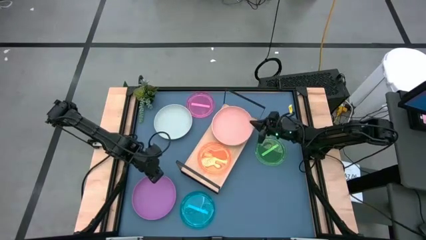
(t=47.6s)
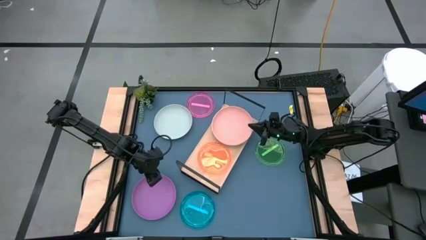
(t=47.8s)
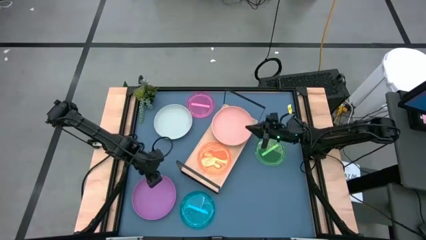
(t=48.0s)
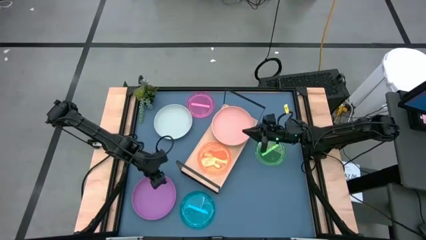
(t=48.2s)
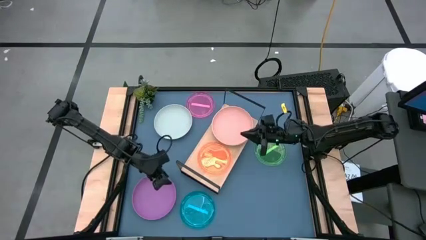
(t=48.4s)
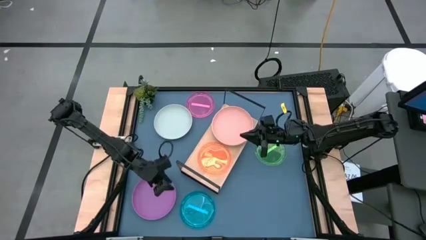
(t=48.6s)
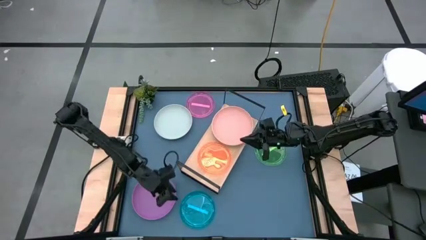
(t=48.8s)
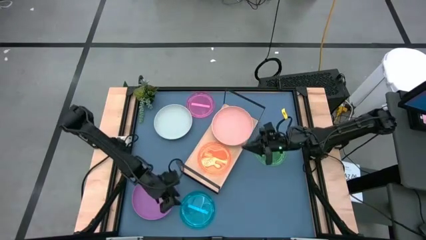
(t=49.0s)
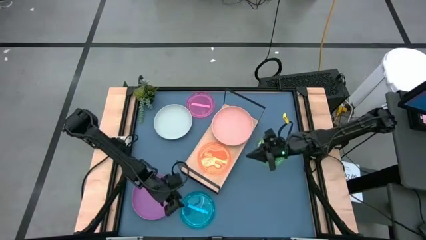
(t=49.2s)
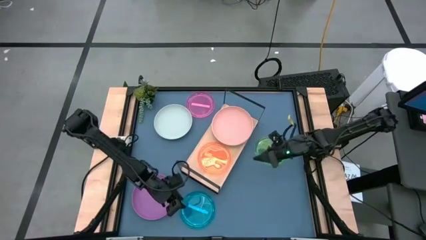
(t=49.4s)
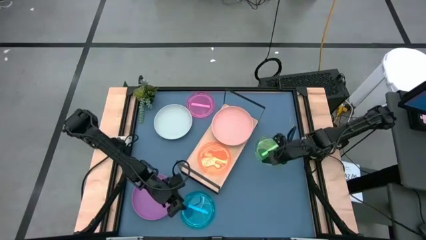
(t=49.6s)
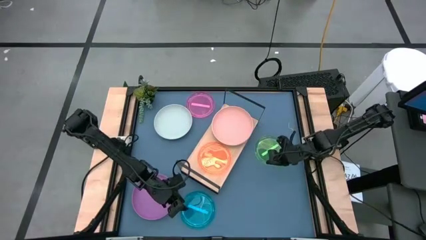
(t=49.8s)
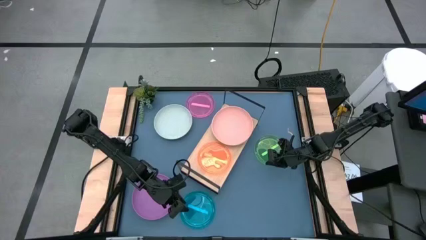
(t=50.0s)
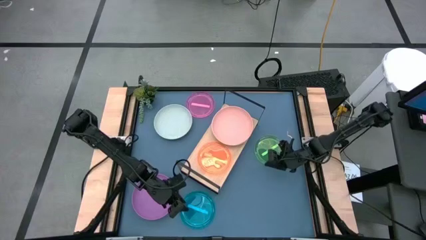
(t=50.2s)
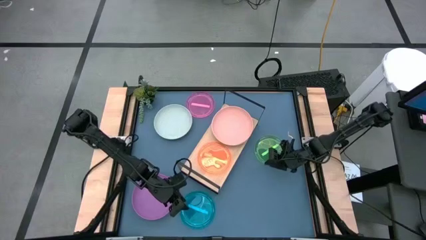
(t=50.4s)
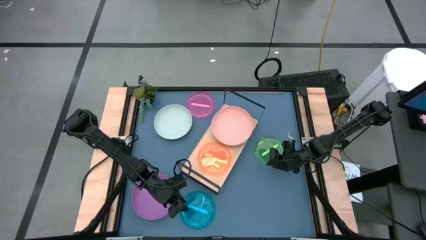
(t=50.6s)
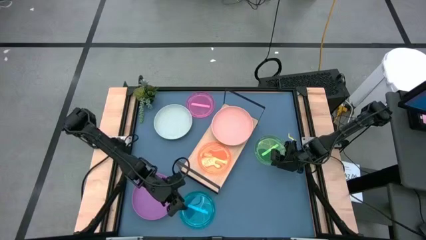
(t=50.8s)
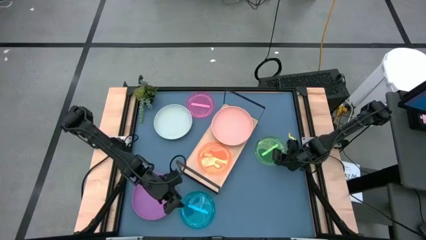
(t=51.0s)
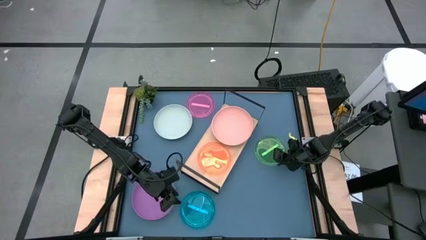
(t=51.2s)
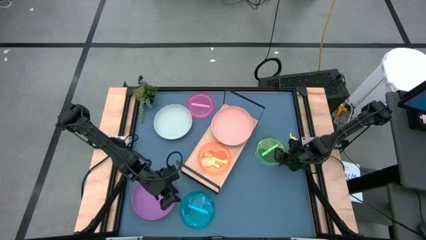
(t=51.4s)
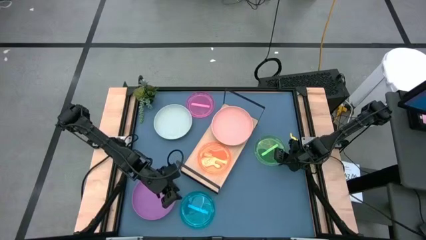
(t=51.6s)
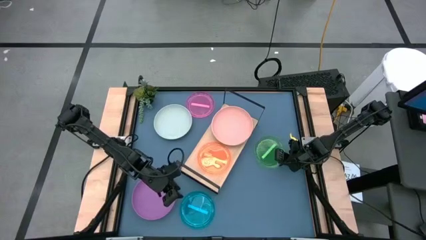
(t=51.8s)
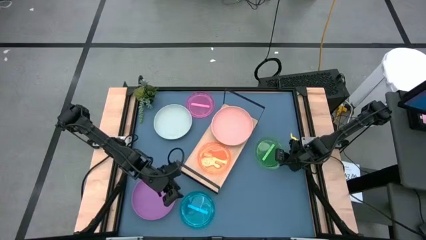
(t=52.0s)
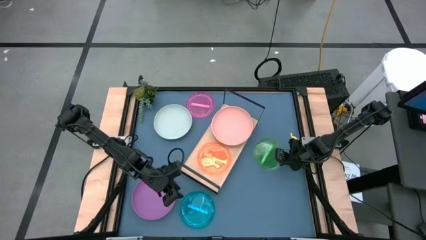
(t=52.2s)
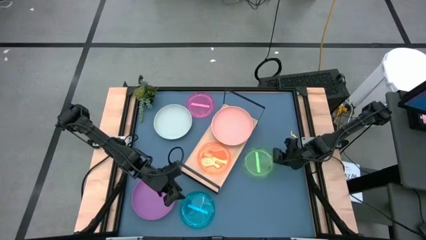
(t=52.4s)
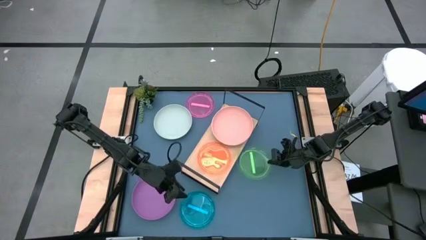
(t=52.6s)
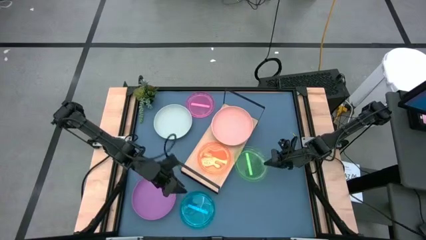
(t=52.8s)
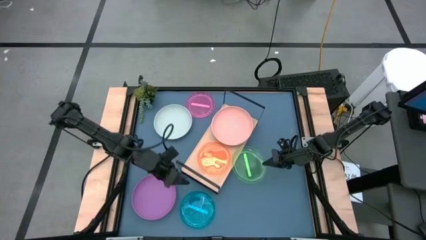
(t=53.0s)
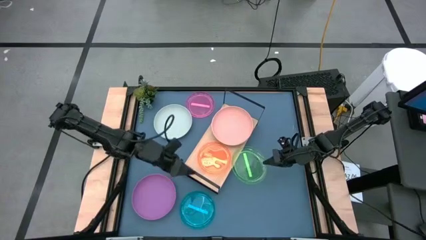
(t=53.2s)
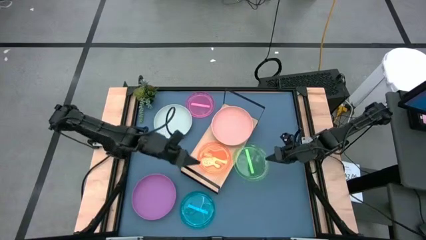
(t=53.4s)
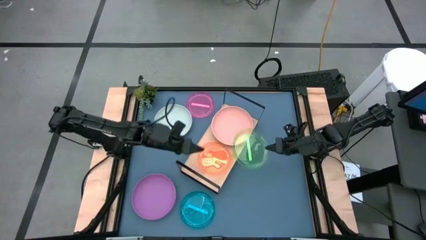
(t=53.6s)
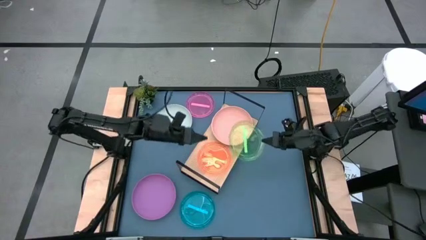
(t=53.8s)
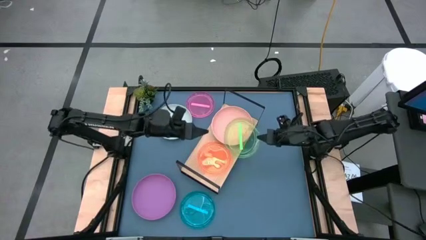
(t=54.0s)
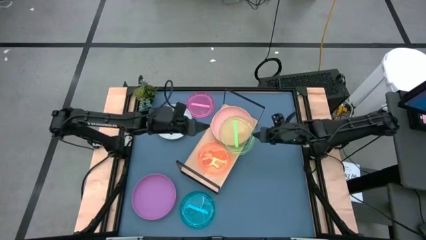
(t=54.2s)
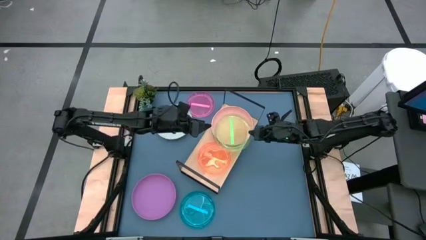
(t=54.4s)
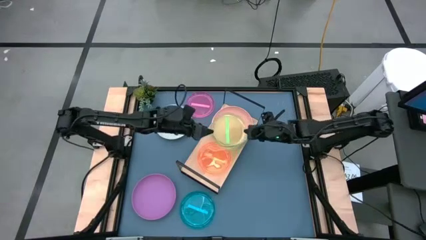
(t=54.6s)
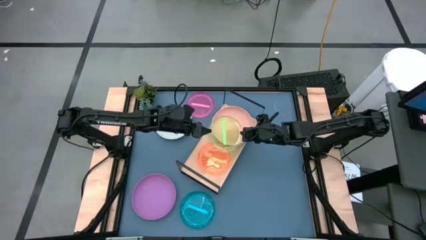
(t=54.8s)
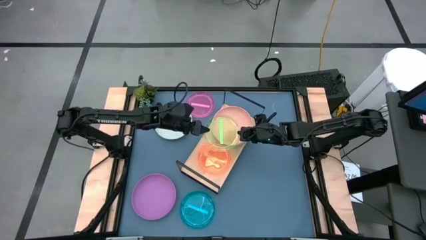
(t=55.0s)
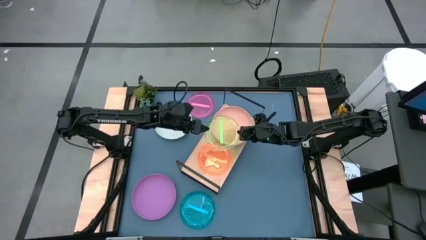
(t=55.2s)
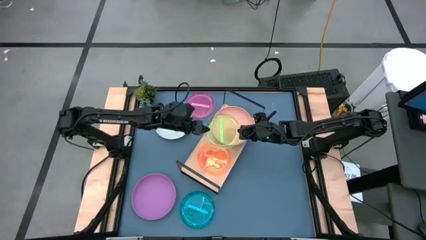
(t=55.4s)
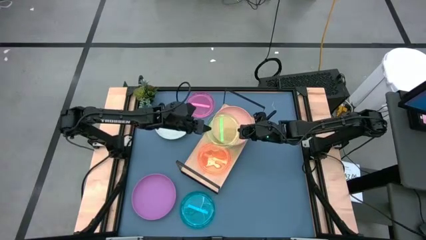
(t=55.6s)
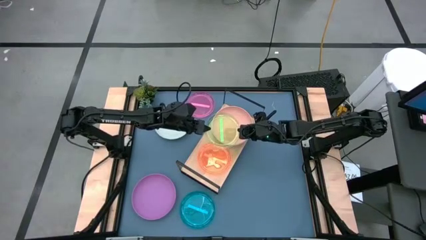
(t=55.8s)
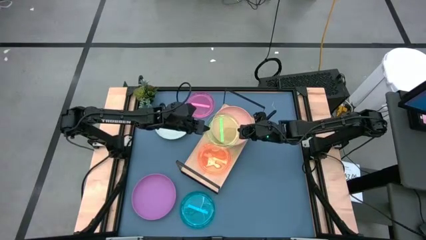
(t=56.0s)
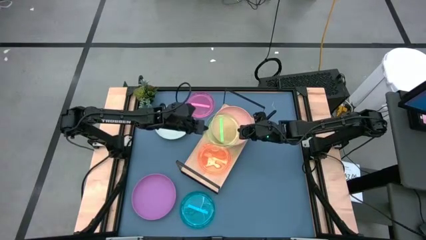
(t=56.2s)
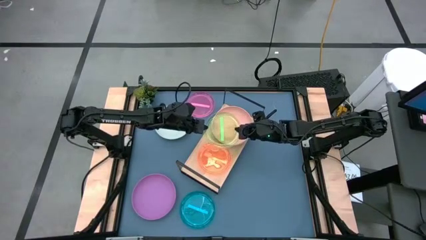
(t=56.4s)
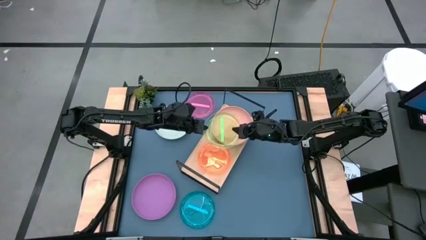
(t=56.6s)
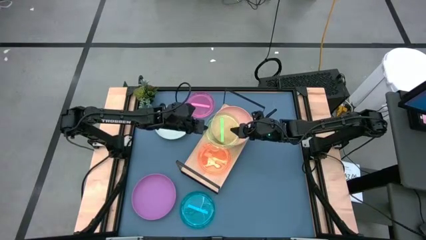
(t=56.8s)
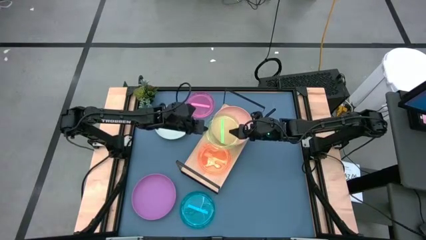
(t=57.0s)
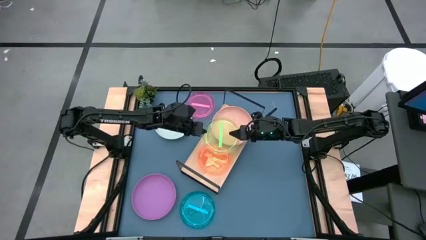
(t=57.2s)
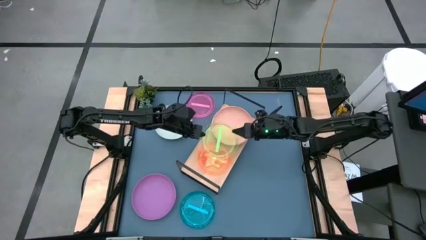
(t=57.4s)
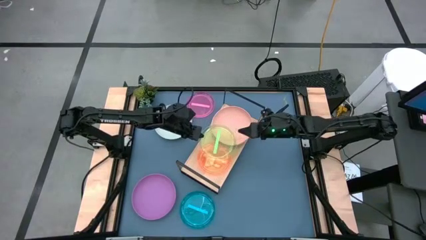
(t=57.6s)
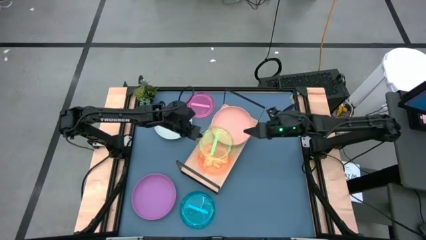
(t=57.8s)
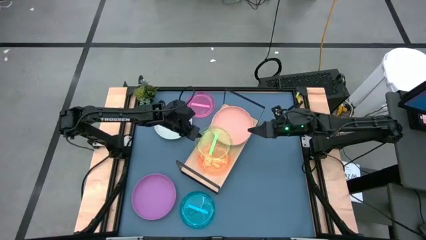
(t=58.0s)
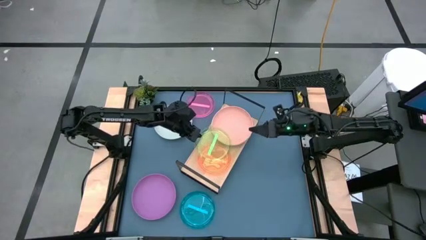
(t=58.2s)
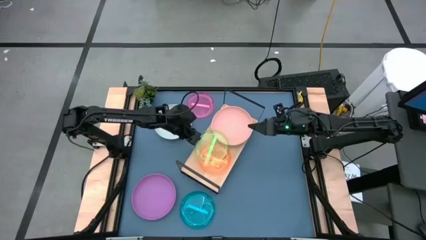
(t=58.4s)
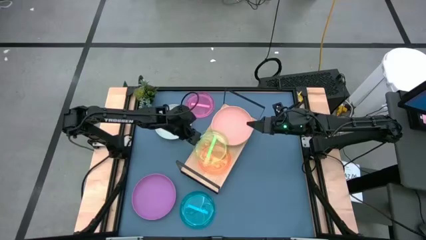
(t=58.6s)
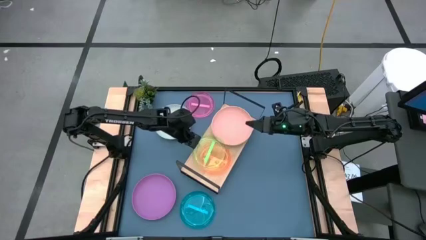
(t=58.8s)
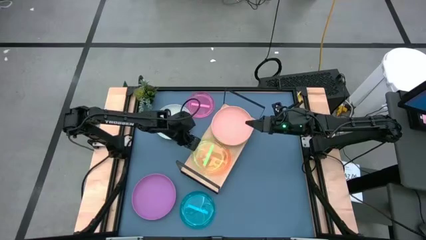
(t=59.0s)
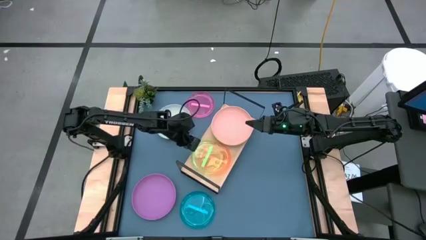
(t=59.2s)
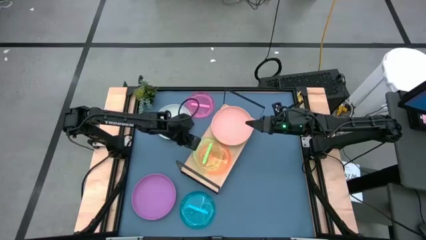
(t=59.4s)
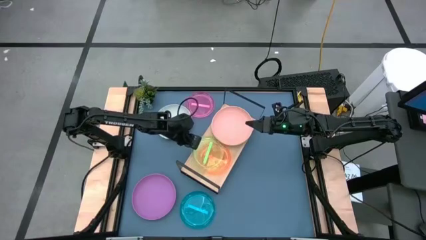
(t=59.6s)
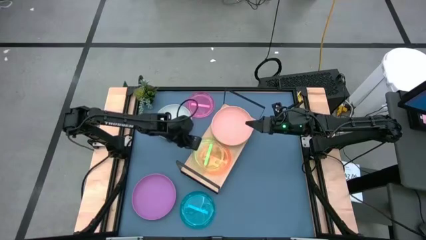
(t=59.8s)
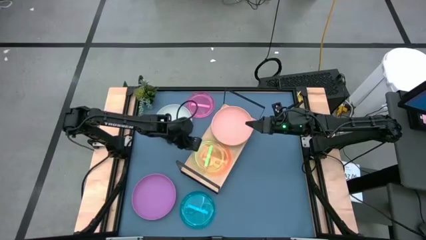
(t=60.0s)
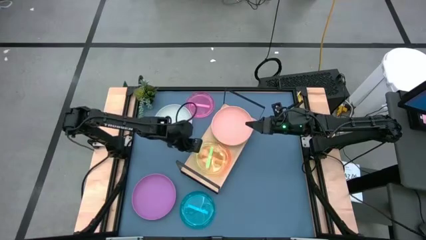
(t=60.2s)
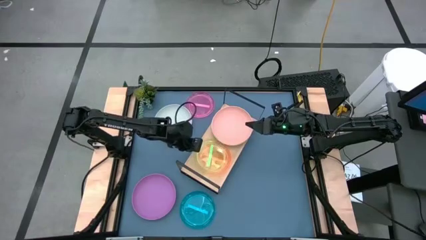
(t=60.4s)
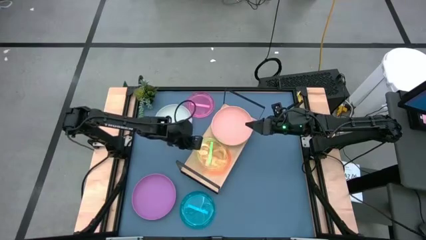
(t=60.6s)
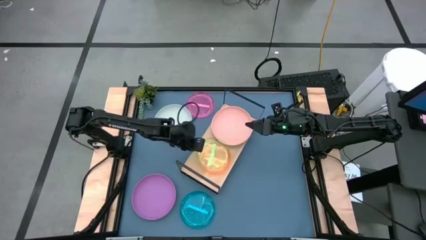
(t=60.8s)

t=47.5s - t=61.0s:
Task: Place and stack plates onto a shelf
Stack the green plate on top of the orange plate on the shelf
